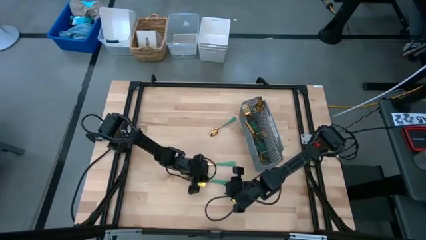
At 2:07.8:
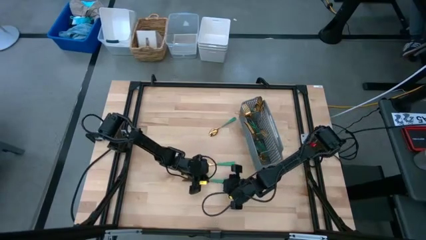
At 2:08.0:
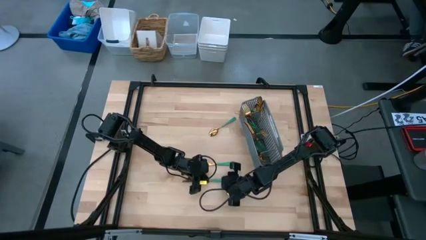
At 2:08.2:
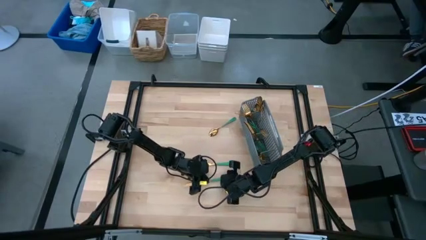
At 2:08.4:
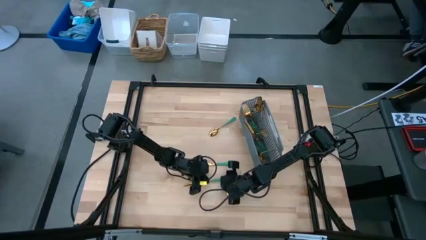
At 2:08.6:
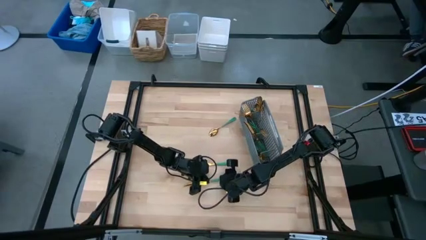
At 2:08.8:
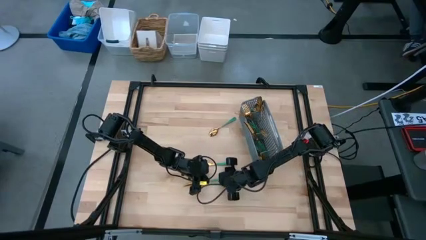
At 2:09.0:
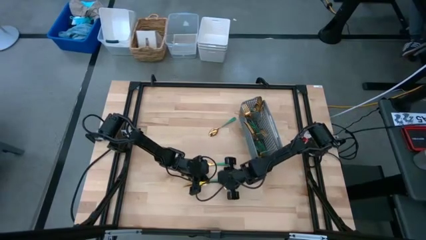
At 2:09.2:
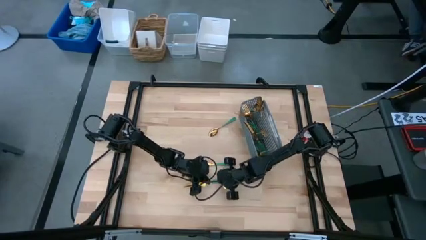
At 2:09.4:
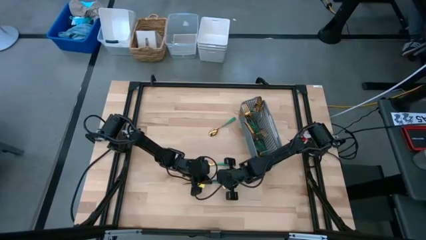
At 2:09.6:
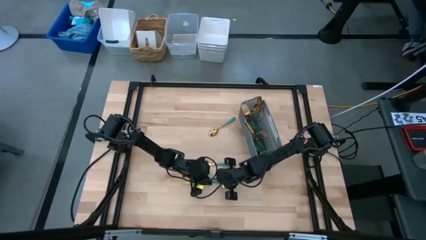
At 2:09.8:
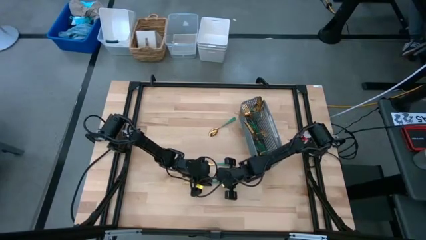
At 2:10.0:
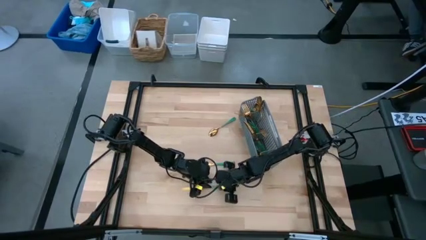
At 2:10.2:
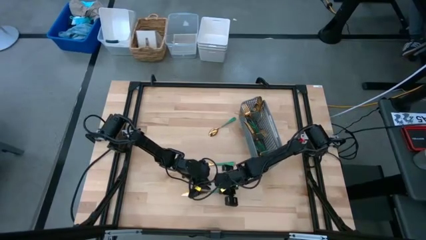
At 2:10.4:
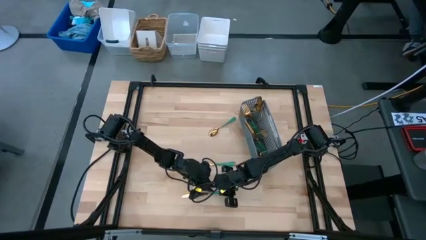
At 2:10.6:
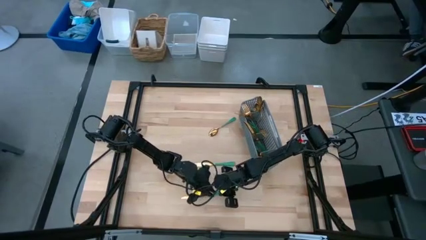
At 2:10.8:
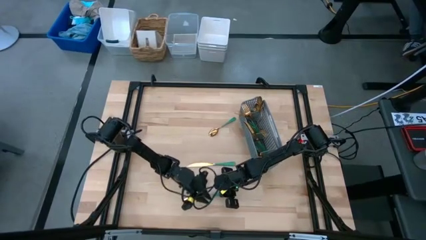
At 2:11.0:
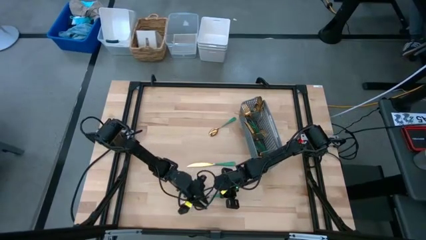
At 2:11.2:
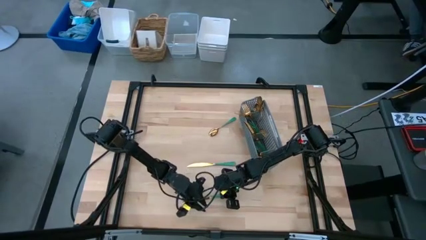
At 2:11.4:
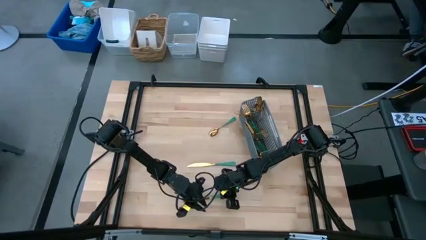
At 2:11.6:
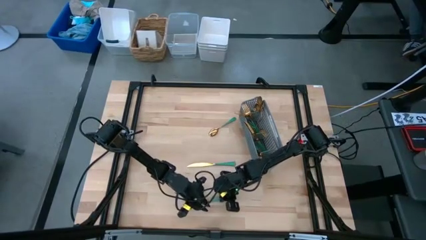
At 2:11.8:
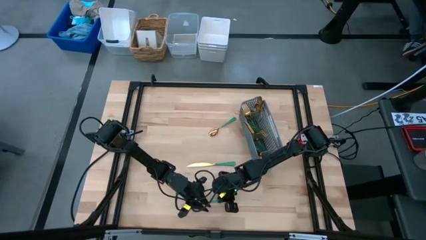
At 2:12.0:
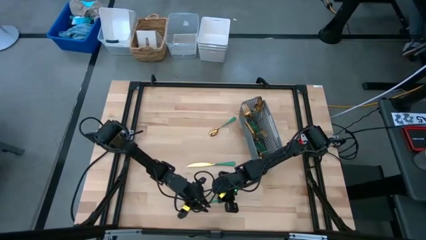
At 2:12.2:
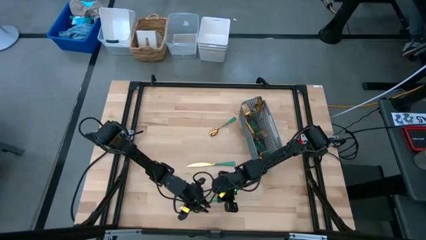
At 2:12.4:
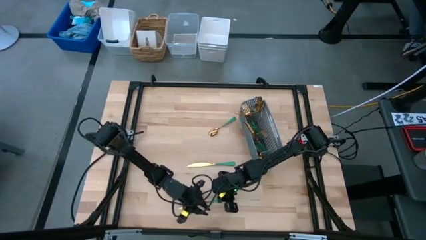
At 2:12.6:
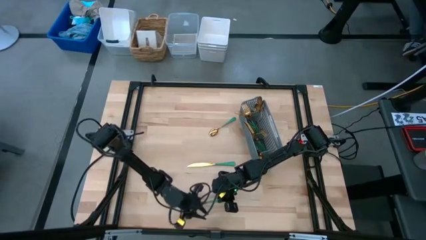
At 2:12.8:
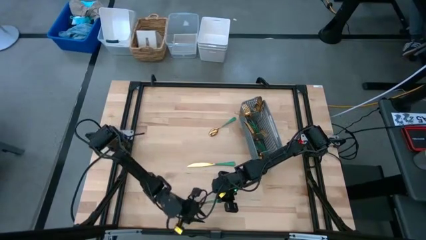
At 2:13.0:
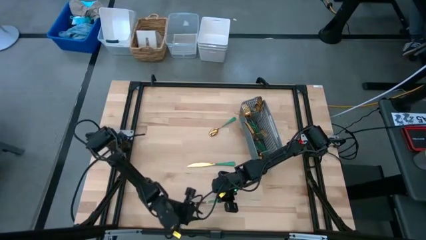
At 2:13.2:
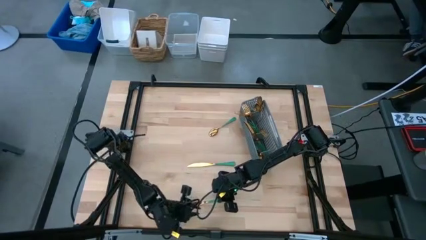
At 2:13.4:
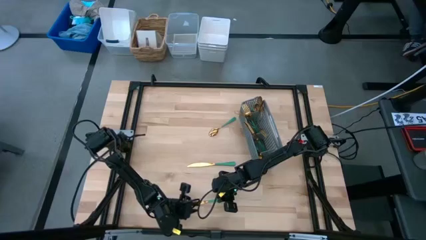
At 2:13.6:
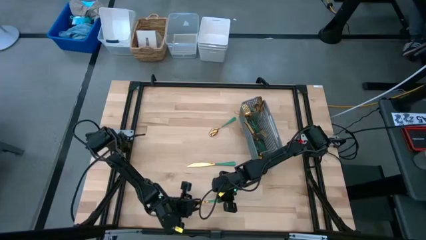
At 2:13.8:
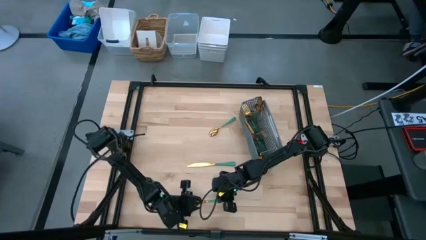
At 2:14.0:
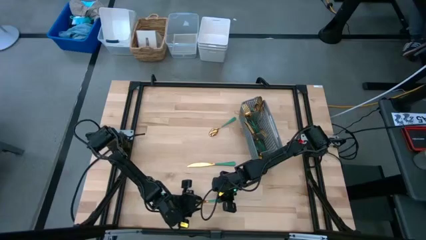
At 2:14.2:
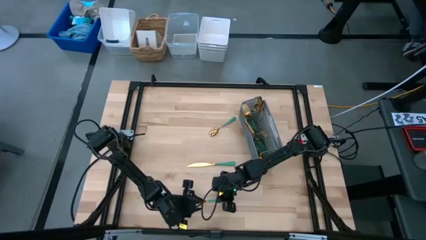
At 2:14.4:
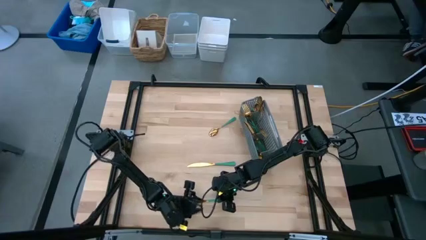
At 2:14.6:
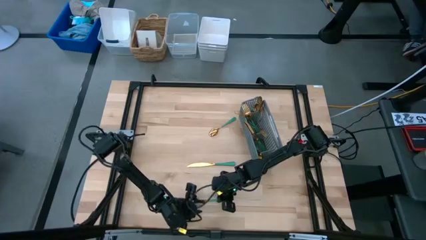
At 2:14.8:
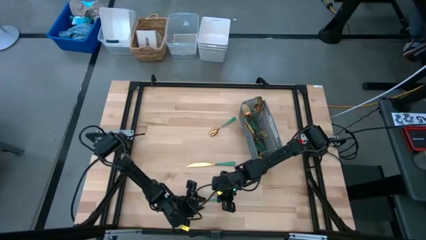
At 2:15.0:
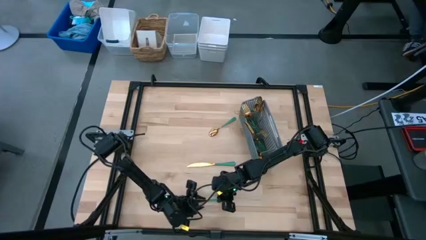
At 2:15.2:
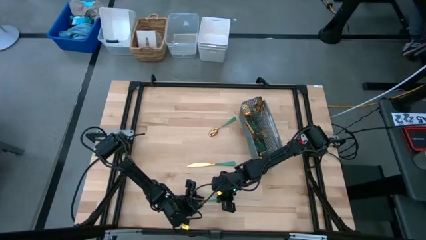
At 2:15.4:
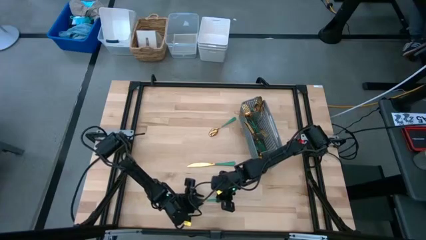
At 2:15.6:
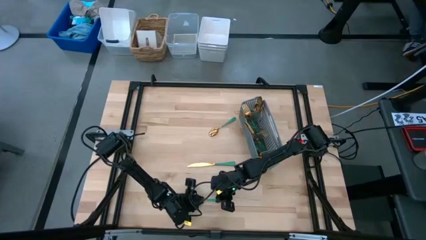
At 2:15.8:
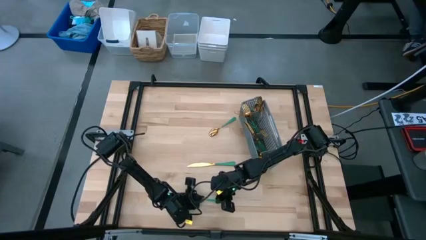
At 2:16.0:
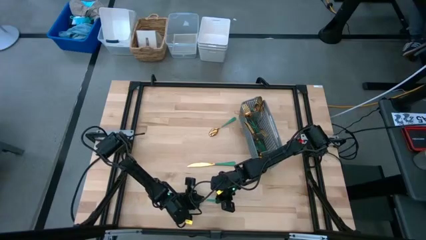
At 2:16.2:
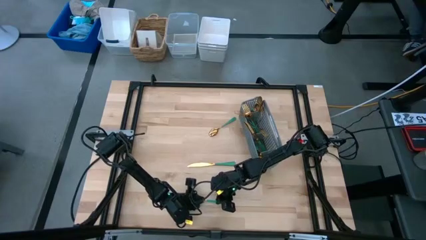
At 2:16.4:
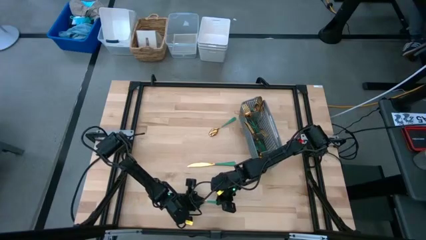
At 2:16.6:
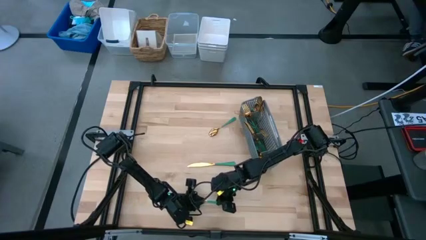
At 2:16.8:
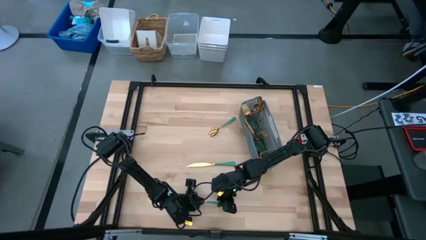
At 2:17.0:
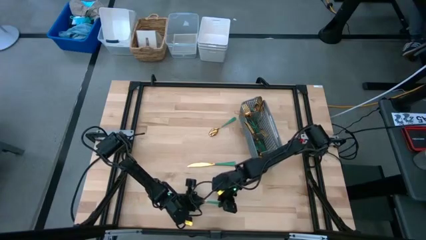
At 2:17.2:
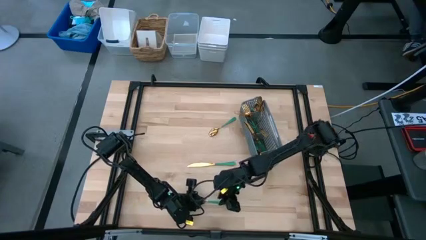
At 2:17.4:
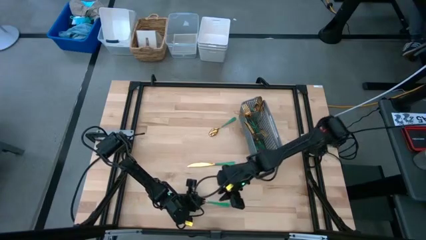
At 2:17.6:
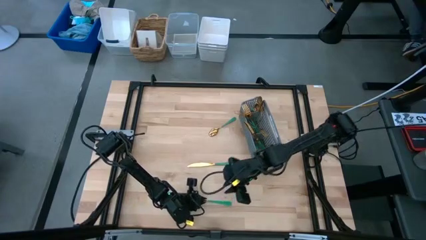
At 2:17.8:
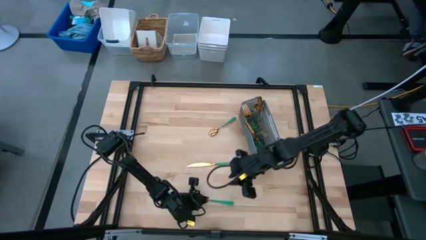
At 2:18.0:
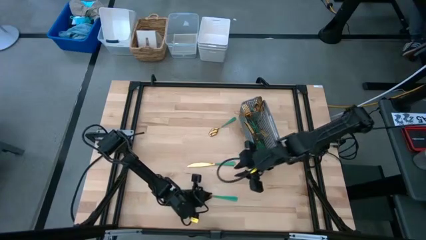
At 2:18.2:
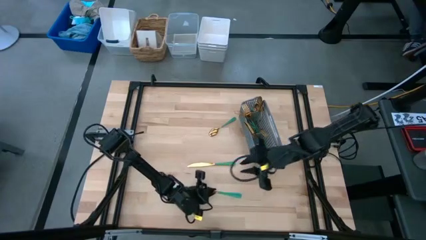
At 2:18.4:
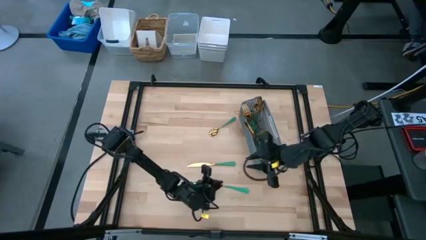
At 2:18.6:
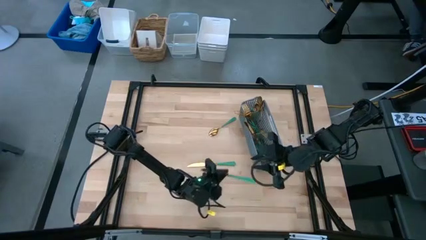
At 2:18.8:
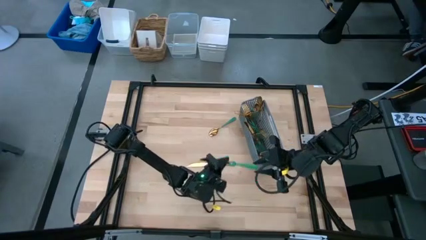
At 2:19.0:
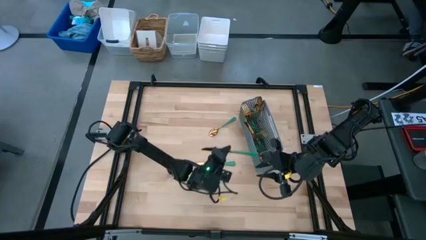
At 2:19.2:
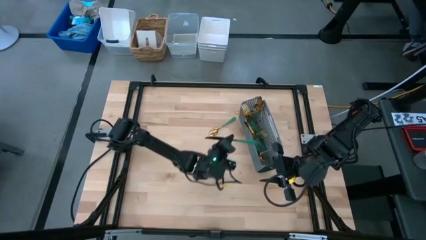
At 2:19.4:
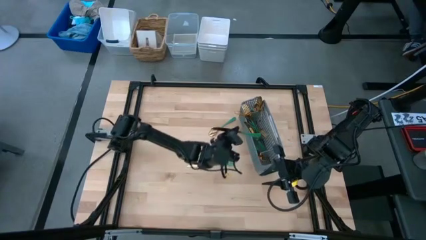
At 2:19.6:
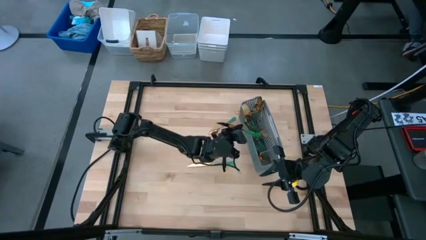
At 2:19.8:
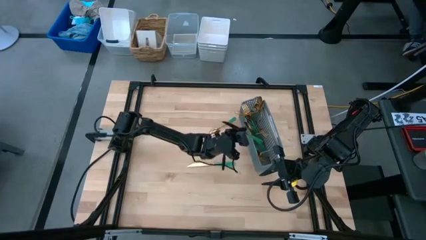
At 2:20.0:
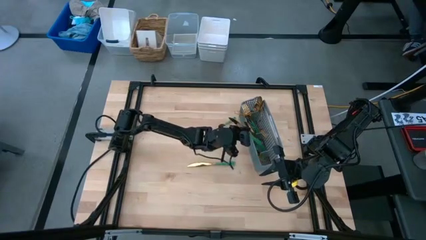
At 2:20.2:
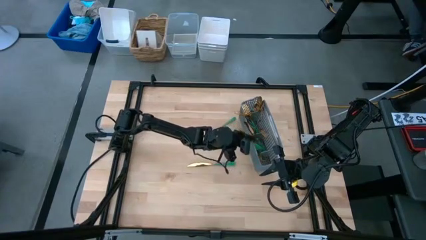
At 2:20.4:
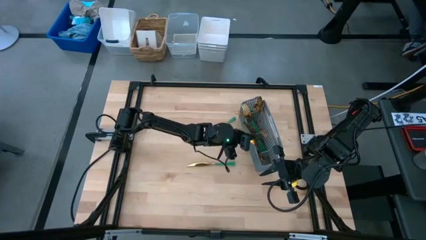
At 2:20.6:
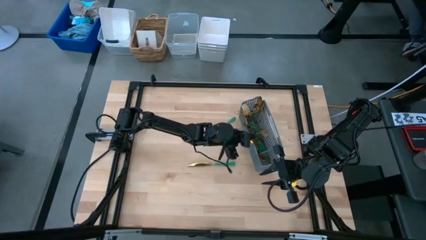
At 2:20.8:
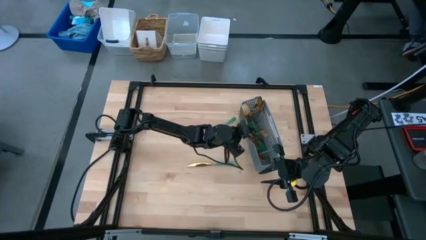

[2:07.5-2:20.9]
Task: Sort silverware
Put the bottom left knife into the bottom section of the basket

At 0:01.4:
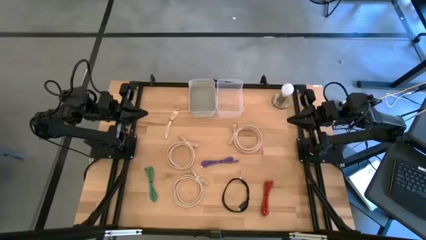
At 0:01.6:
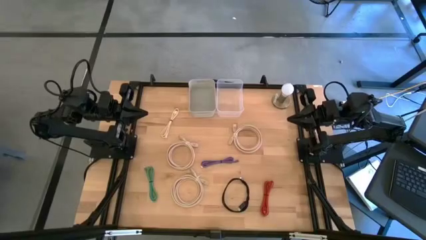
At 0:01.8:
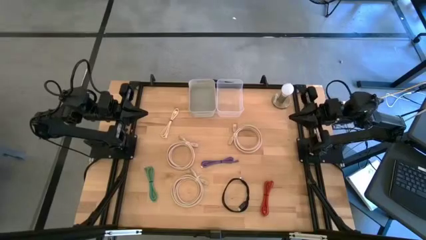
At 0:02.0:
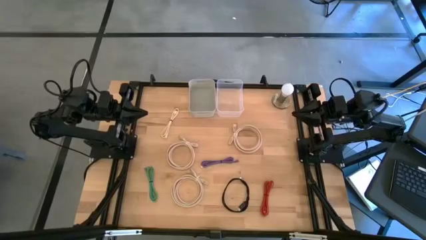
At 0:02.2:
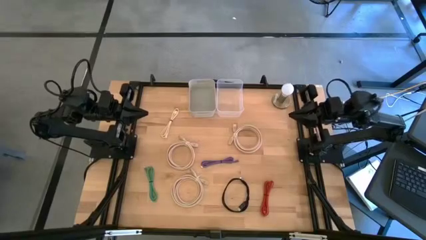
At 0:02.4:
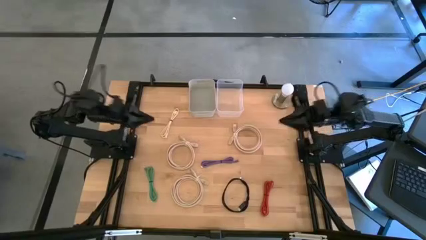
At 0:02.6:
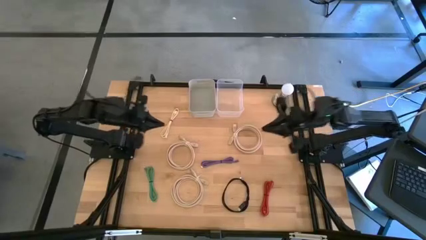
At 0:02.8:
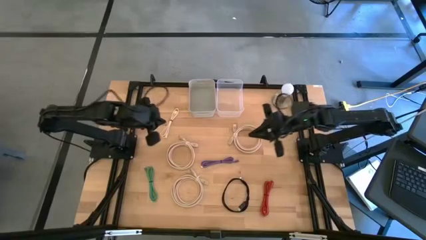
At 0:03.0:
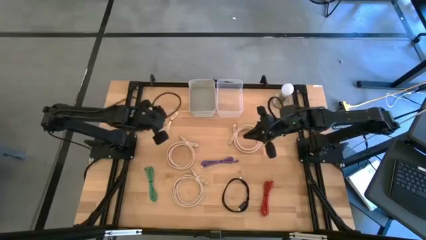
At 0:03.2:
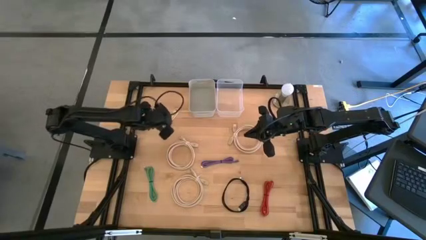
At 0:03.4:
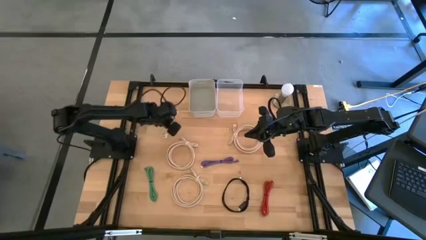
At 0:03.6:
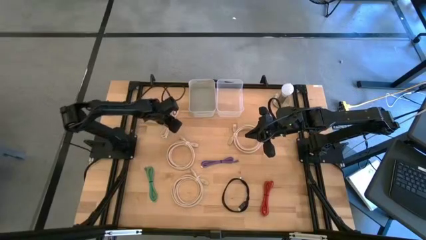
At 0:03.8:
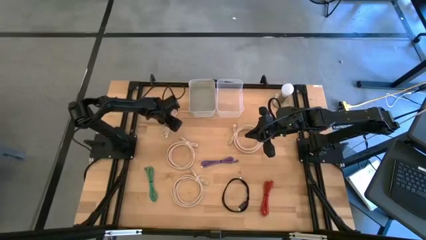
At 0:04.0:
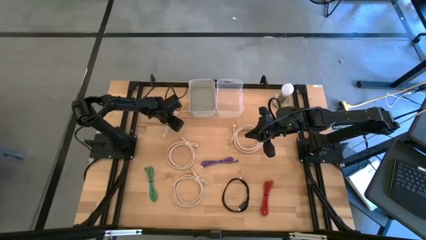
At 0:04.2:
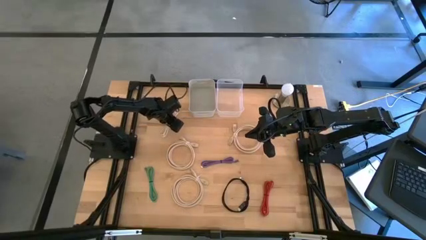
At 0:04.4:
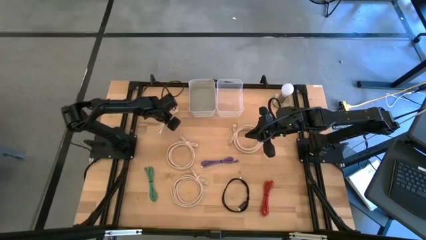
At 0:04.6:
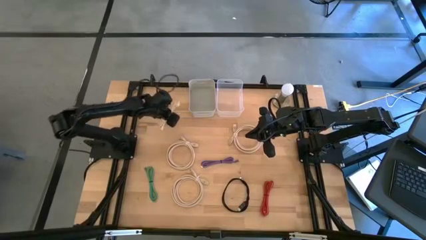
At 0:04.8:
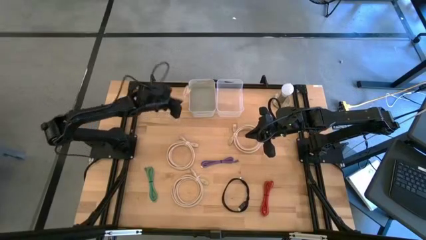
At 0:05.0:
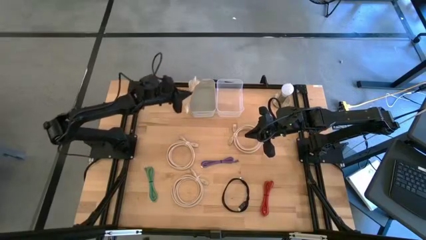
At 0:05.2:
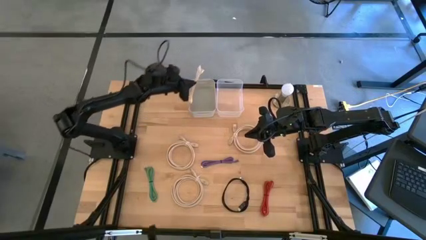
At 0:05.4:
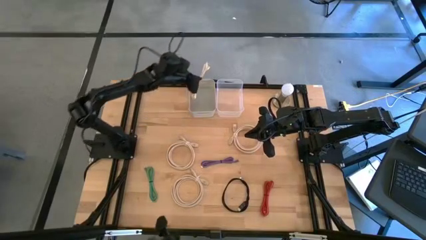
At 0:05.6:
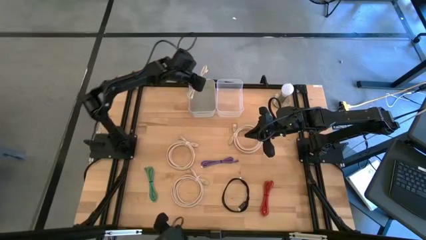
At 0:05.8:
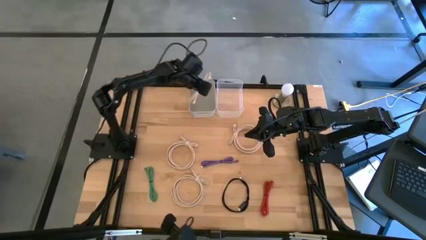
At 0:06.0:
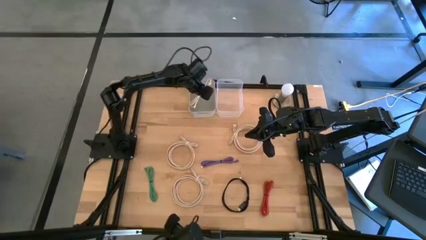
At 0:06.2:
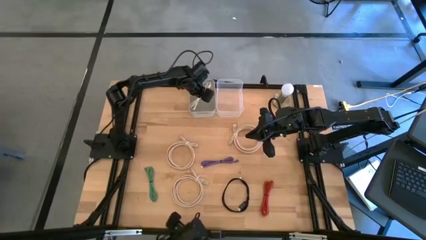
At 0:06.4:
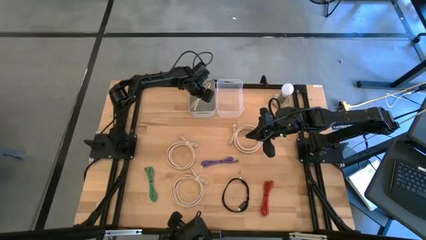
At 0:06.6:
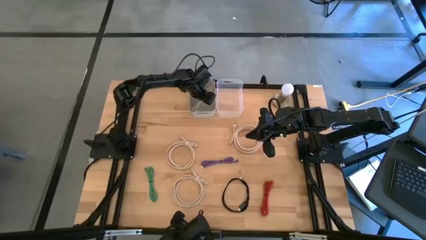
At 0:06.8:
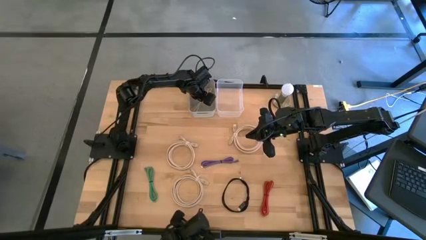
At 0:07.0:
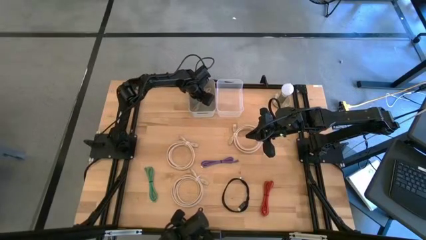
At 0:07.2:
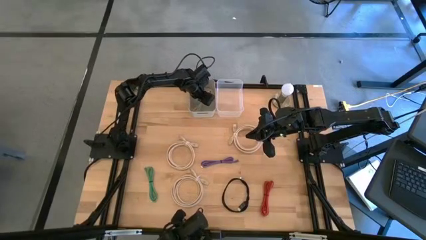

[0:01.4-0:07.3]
Task: Pick and place USB-C Cables
Put the white charger cable into the gray bin
